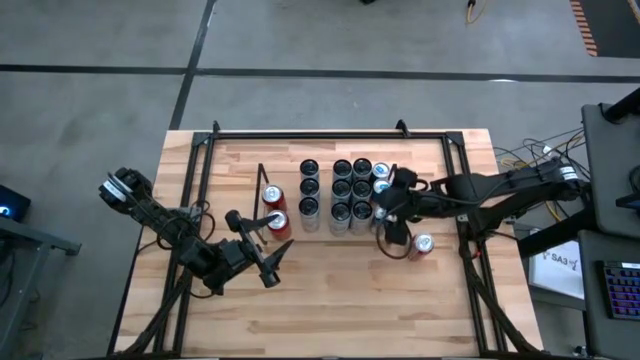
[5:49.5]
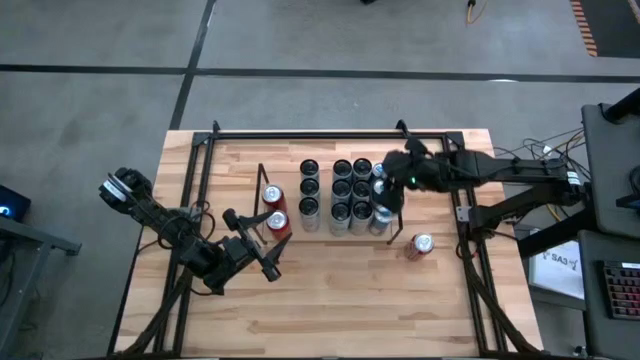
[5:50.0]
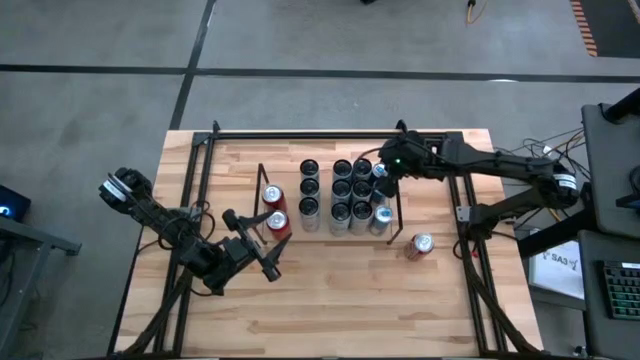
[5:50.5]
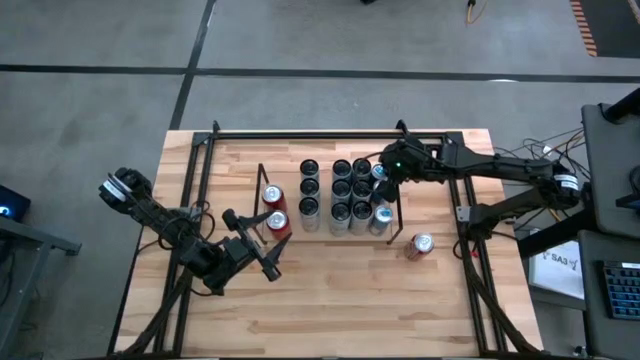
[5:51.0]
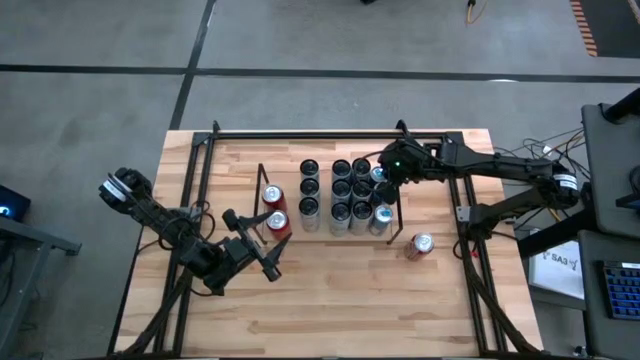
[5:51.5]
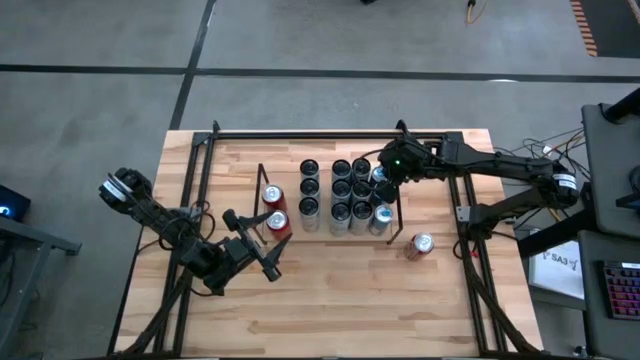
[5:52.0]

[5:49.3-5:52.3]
Task: Place canned beverage on shelf
Adjust the blue soda cans

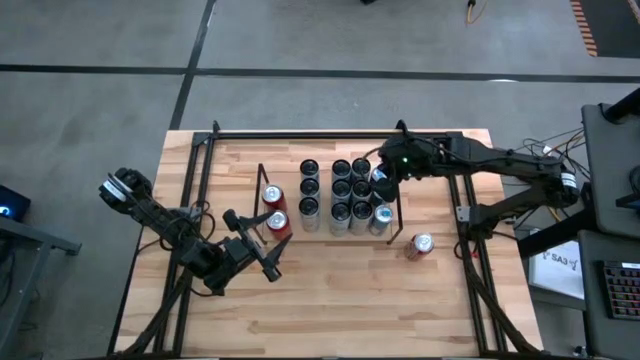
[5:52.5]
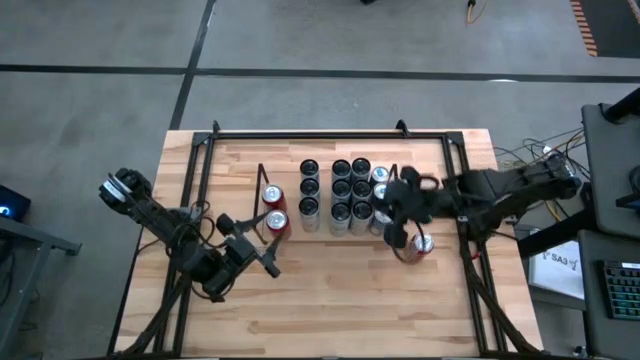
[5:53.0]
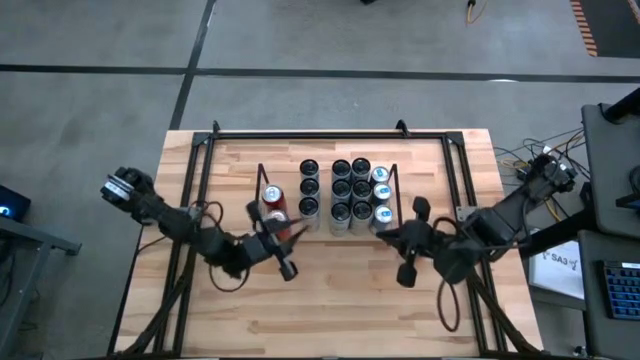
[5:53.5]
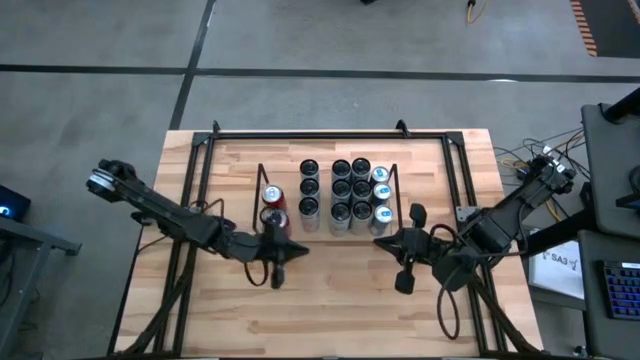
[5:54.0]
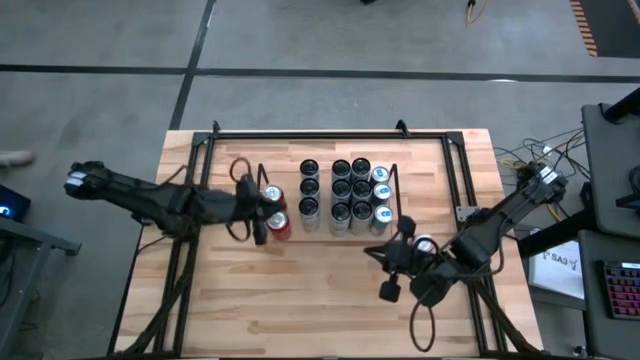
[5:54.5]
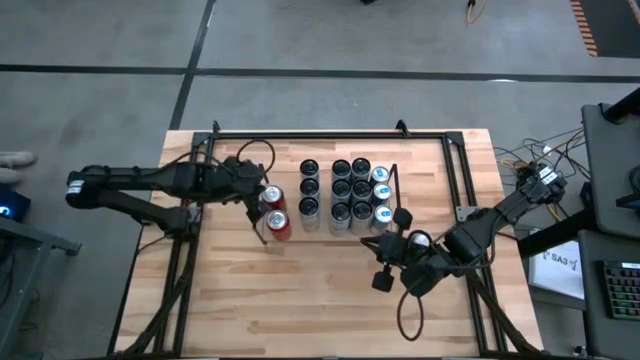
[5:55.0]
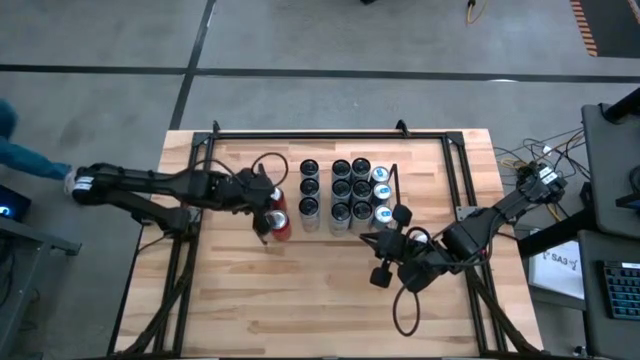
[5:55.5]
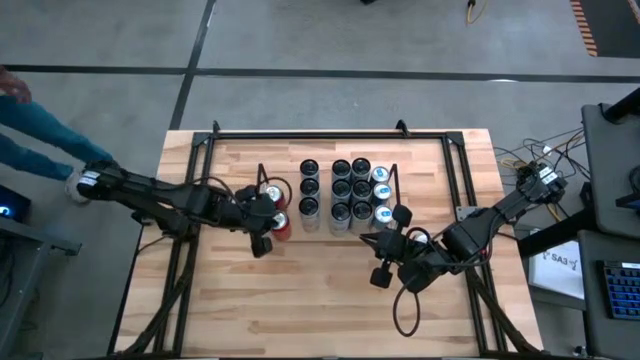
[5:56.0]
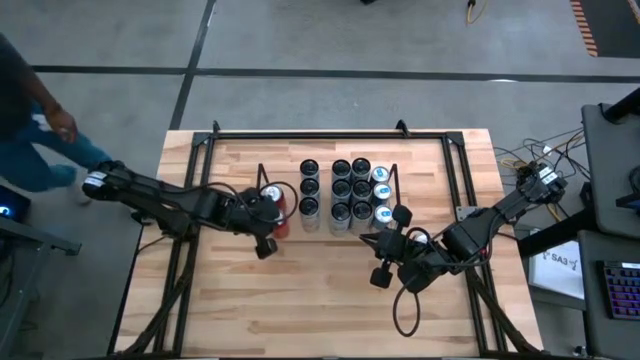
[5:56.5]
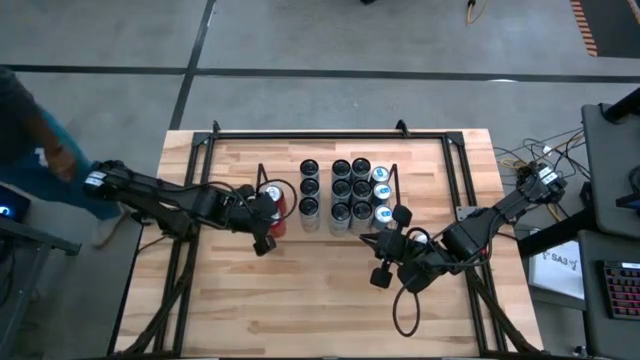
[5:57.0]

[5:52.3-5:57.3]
Adjust the red and black soda can

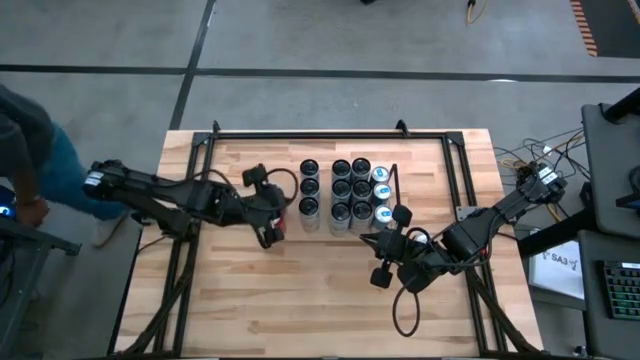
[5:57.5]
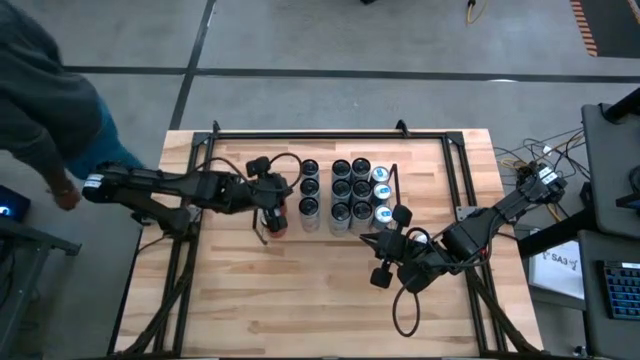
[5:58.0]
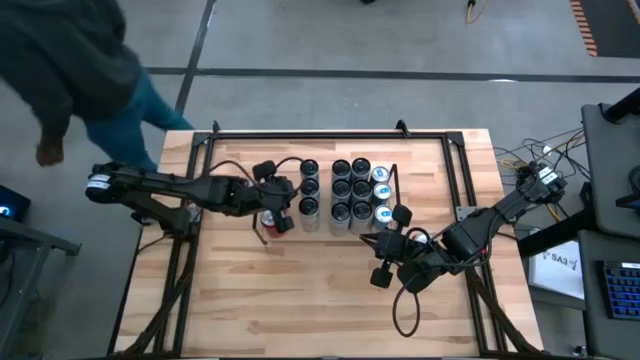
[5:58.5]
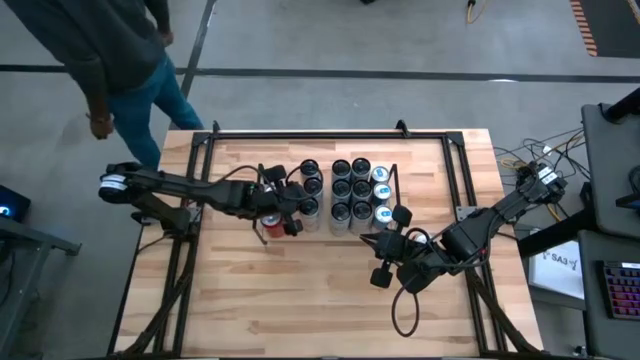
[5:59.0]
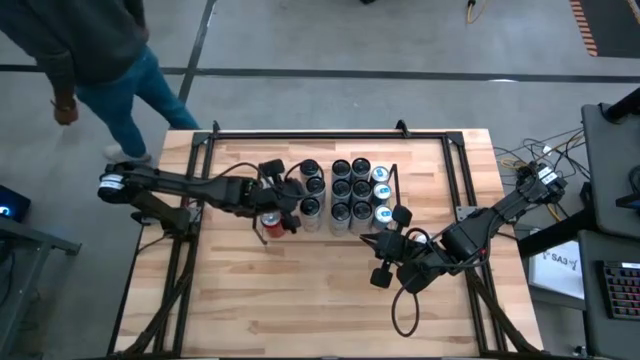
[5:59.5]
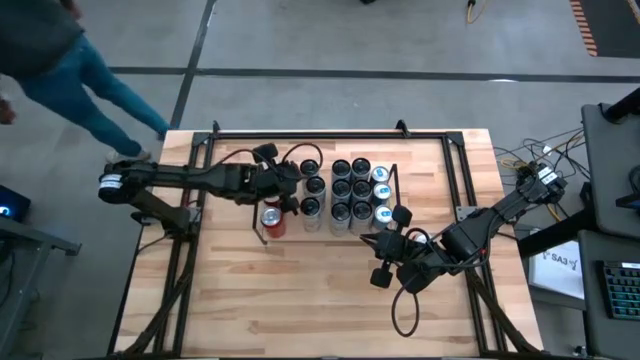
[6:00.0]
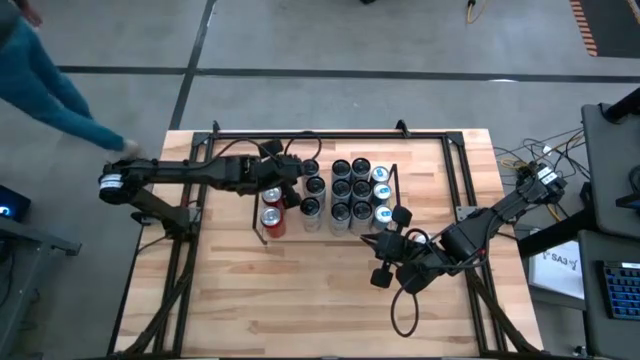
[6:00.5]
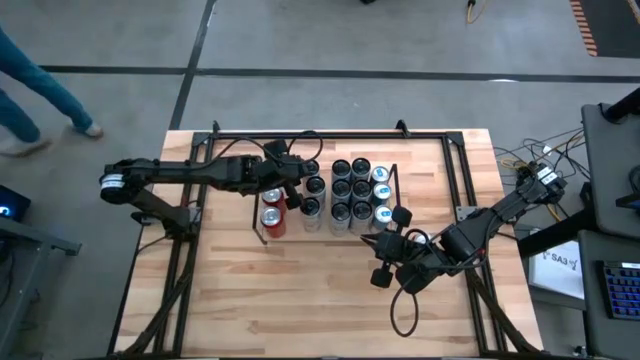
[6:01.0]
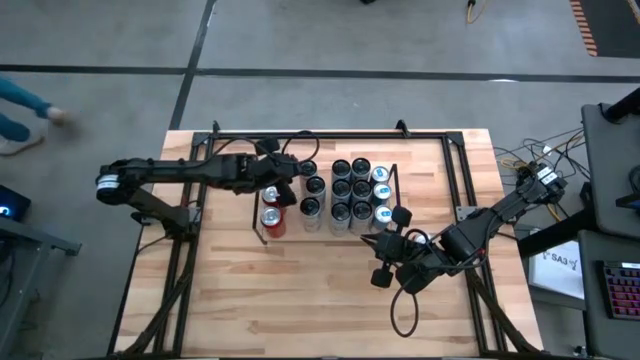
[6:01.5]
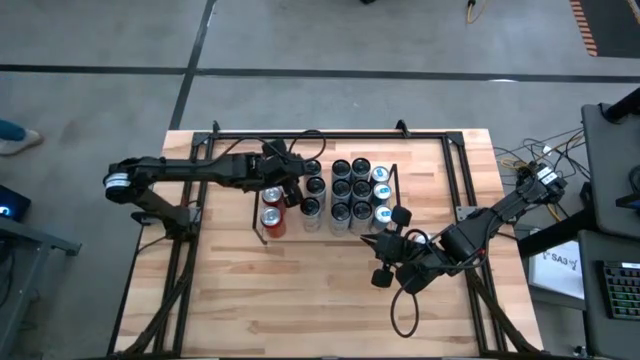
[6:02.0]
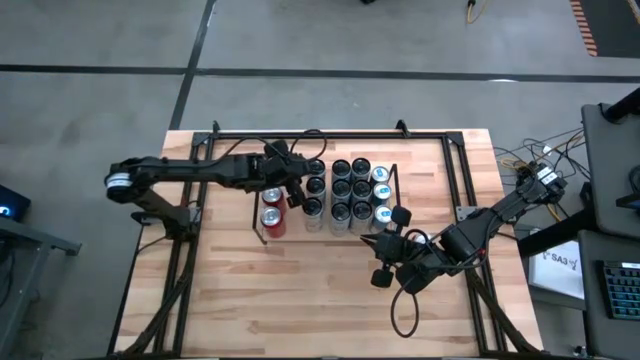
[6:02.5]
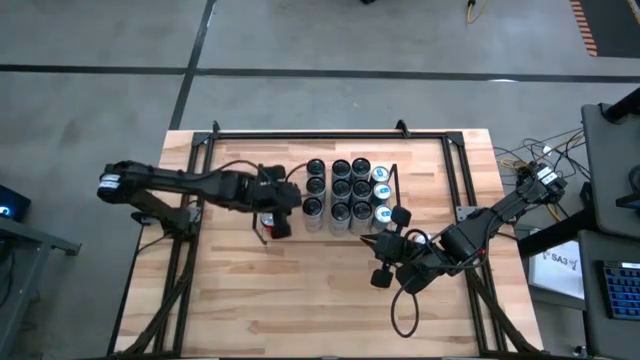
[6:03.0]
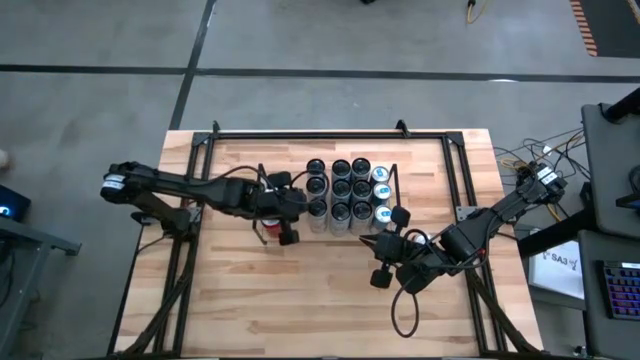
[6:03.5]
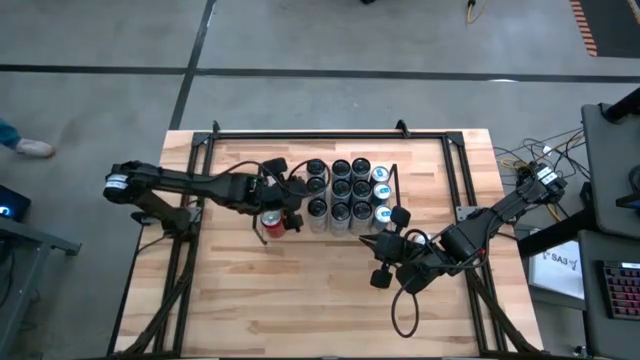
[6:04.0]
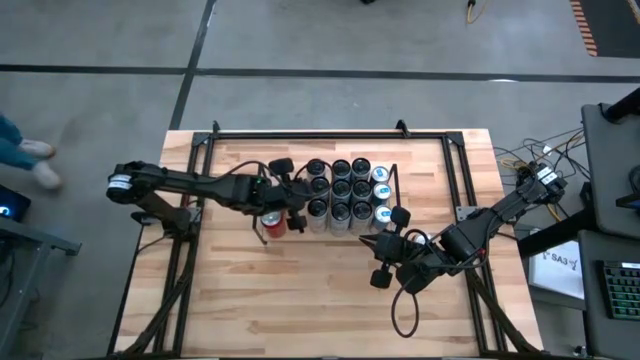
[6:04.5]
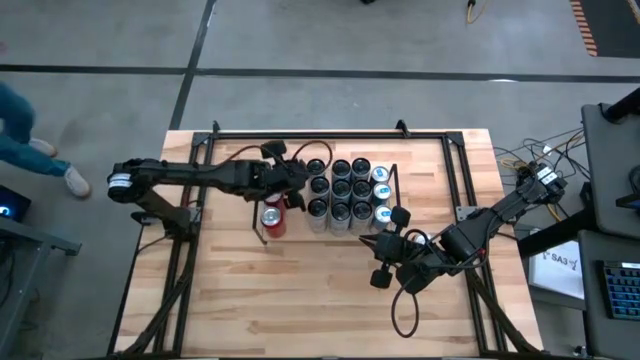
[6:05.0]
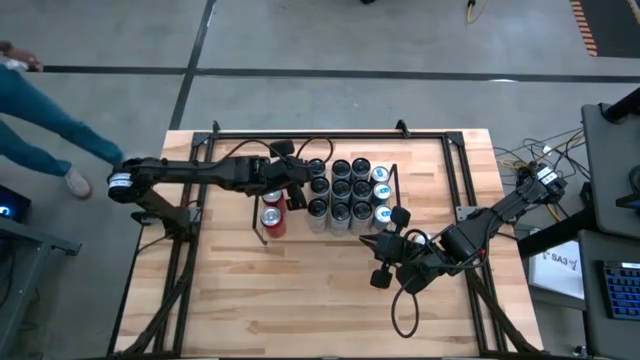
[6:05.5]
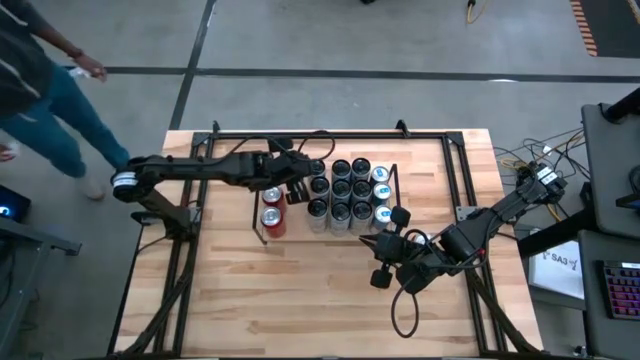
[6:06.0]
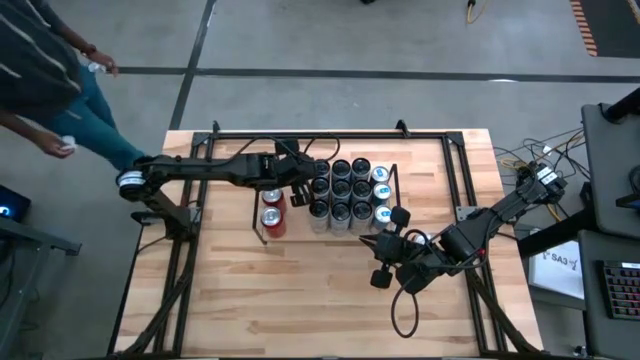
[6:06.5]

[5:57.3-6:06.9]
Adjust the white and pink soda cans

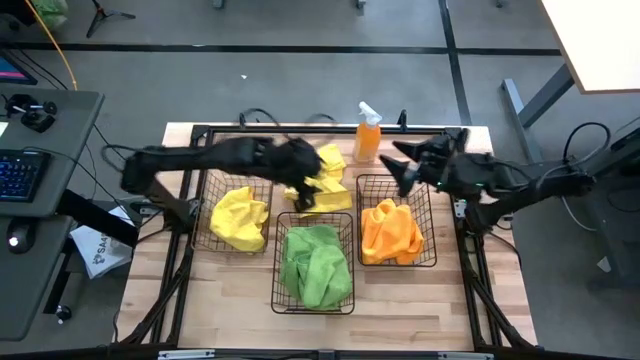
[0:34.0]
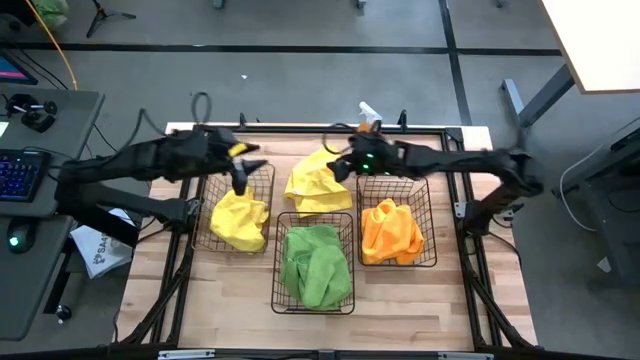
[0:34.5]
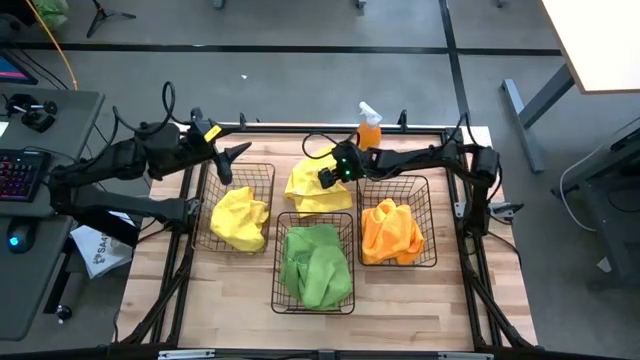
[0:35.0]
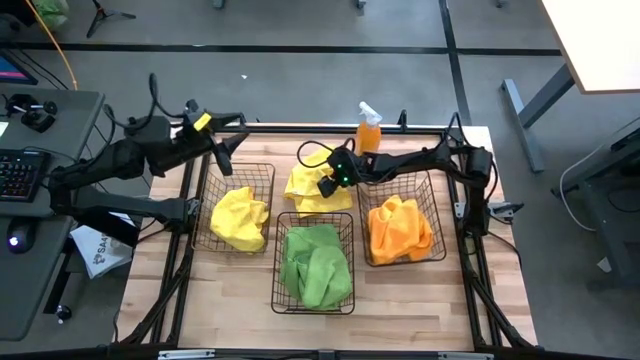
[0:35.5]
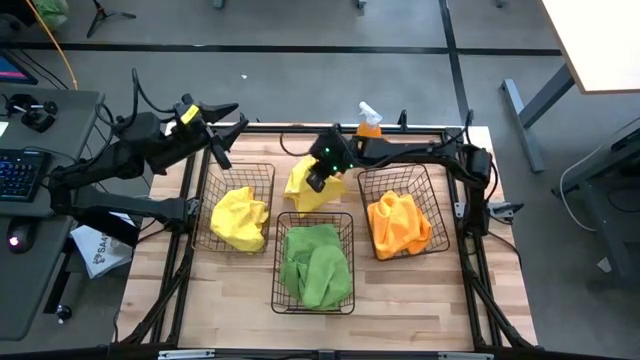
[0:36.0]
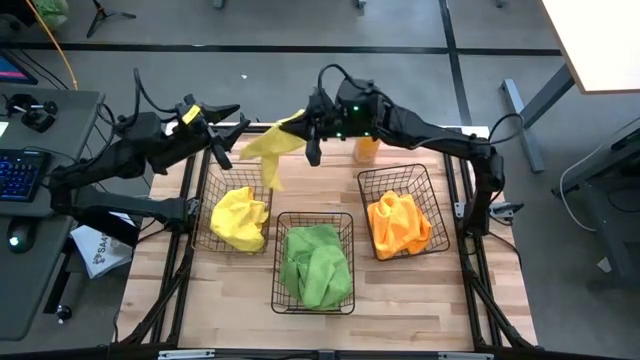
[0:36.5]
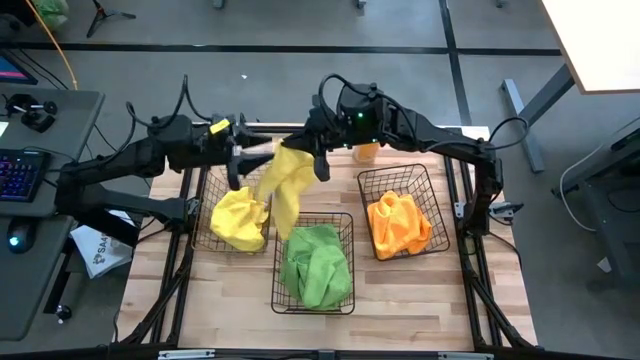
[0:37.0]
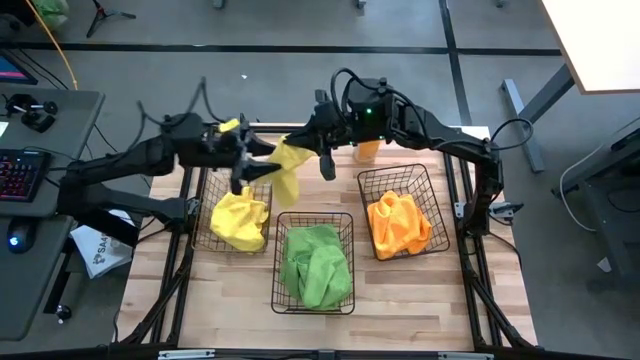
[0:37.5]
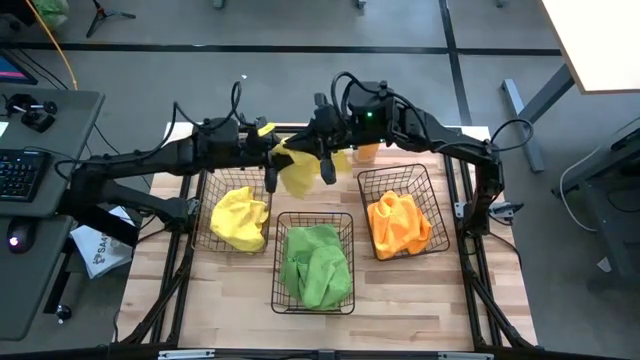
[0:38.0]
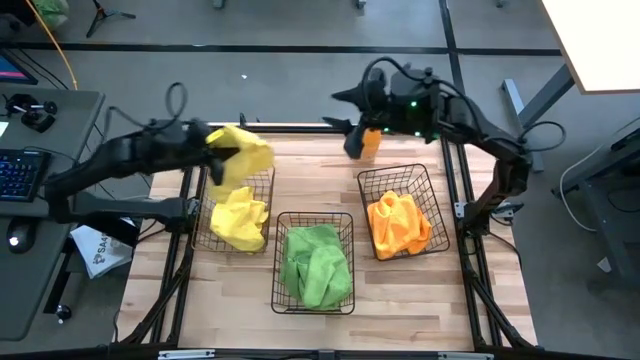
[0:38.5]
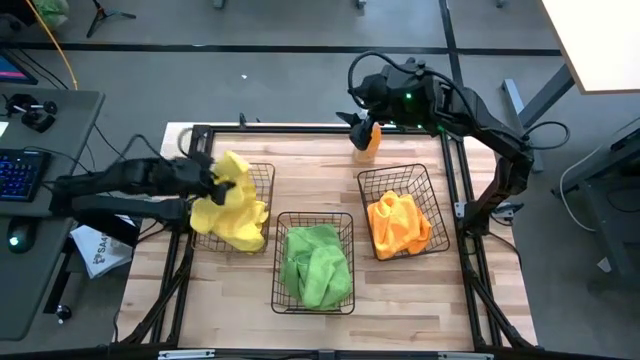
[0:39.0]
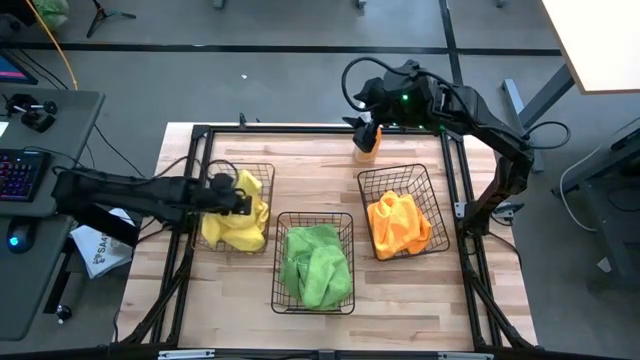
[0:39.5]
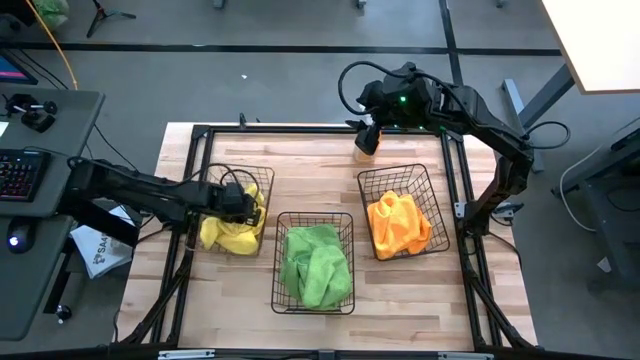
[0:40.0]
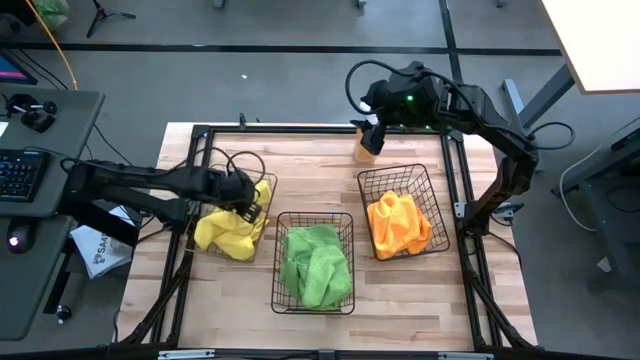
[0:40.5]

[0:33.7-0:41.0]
Task: Sort microfiber towel by color & place in baskets
Put the yellow towel into the left wire basket
